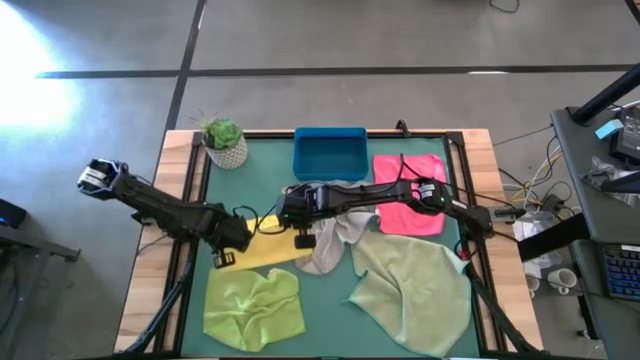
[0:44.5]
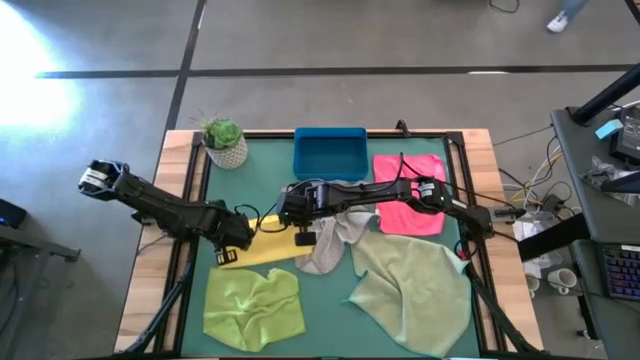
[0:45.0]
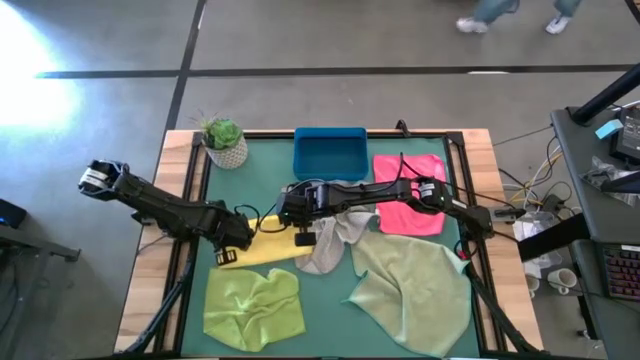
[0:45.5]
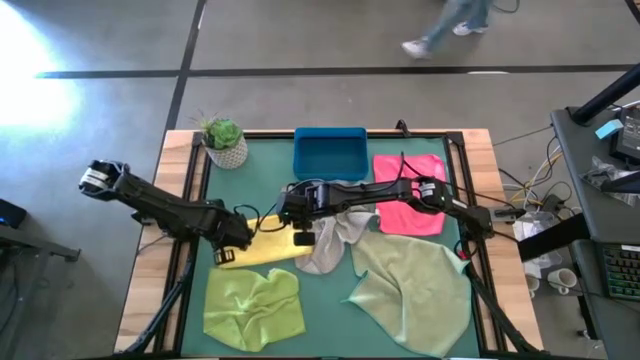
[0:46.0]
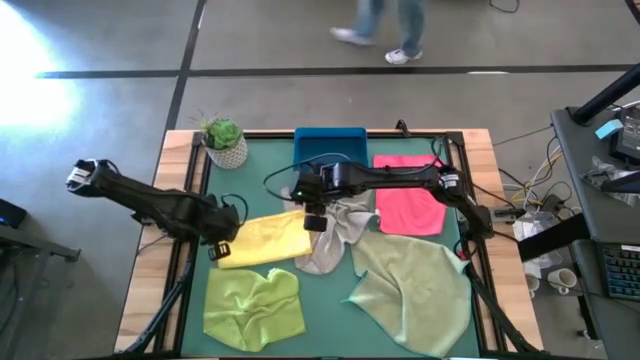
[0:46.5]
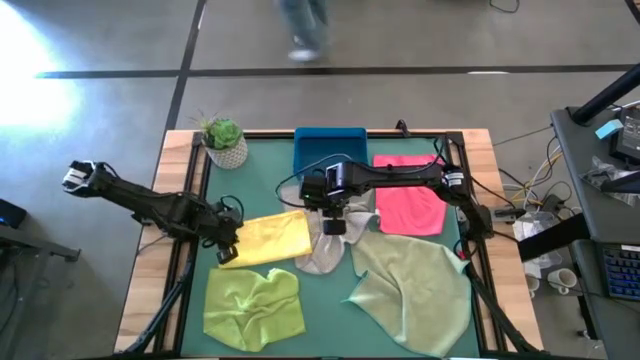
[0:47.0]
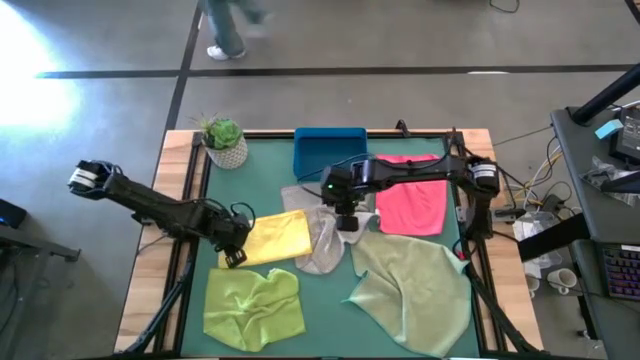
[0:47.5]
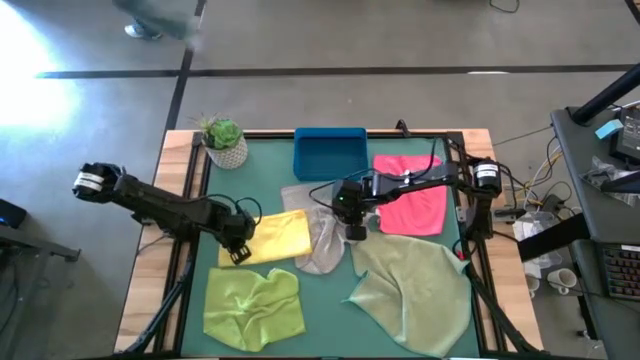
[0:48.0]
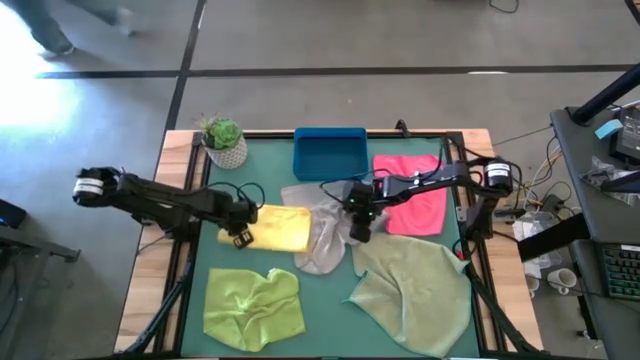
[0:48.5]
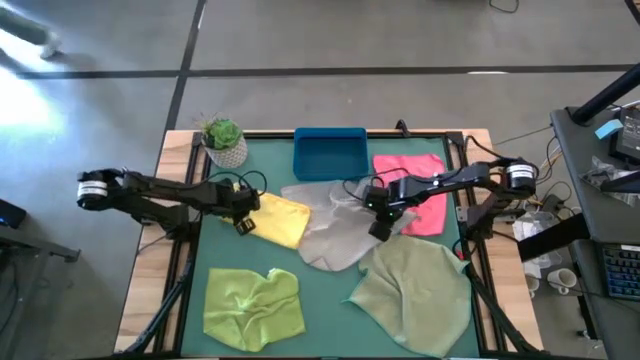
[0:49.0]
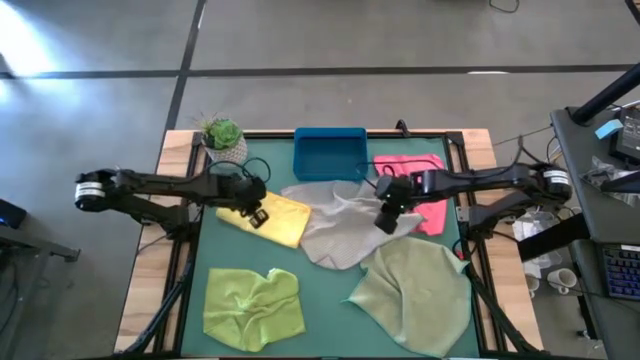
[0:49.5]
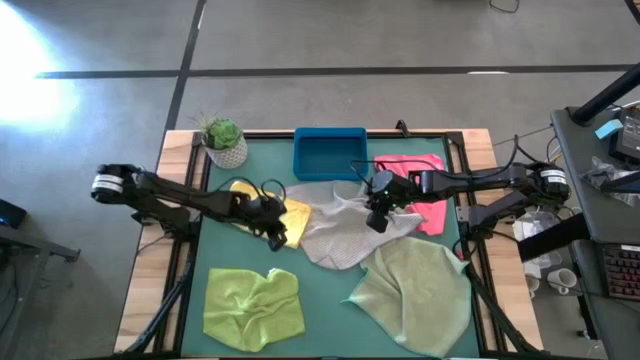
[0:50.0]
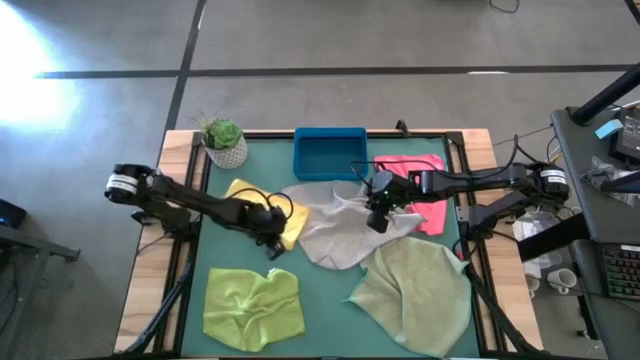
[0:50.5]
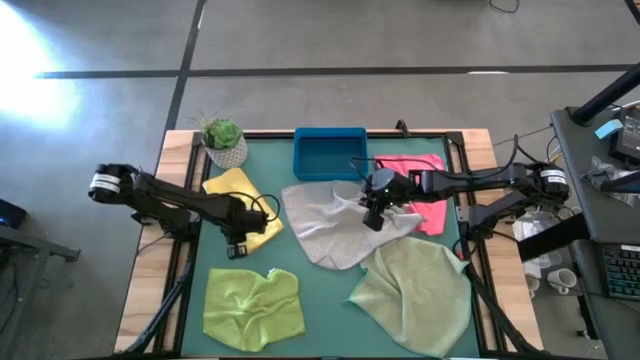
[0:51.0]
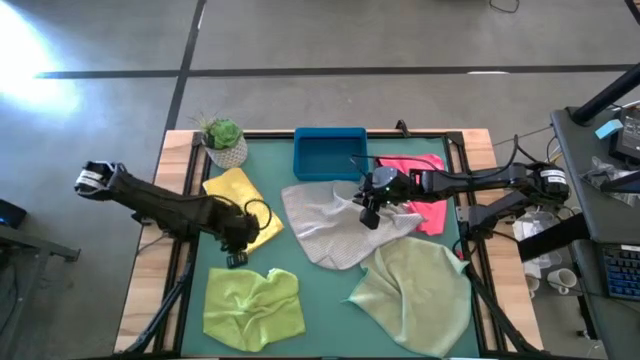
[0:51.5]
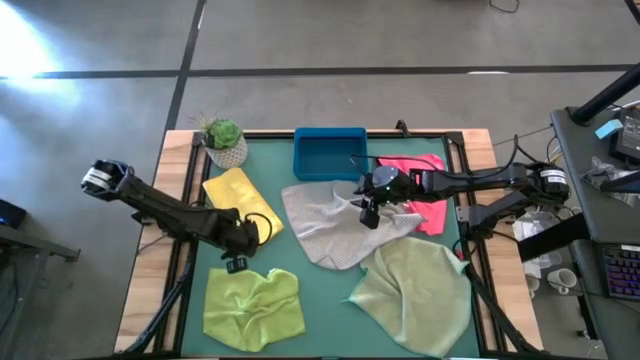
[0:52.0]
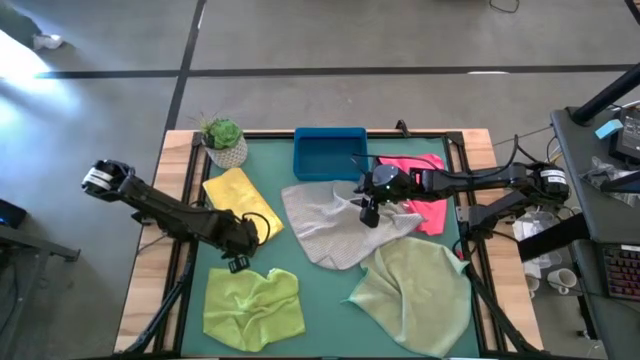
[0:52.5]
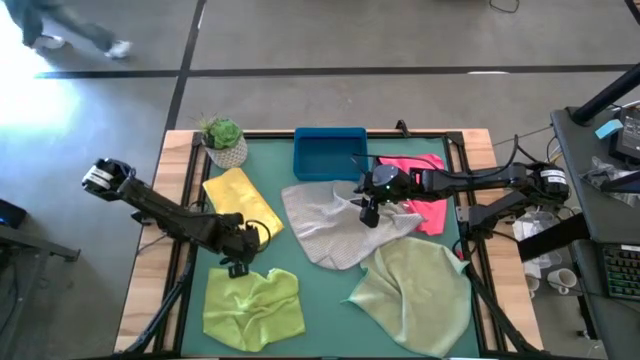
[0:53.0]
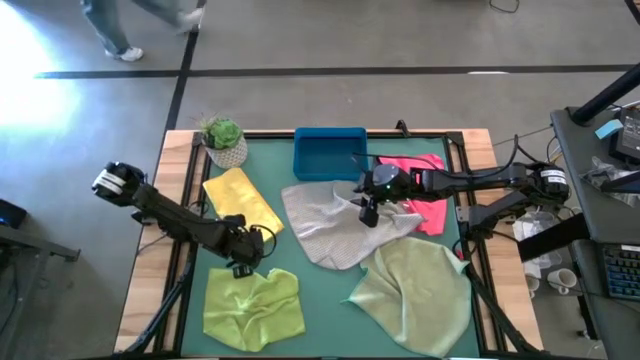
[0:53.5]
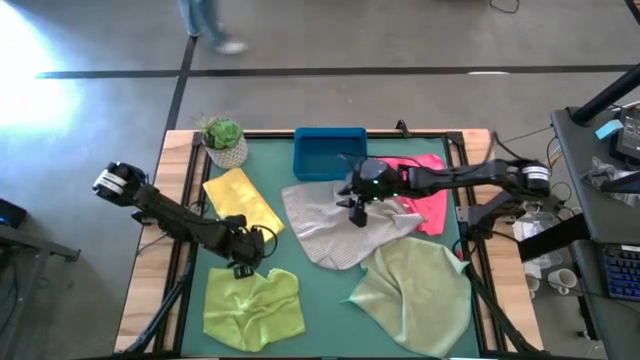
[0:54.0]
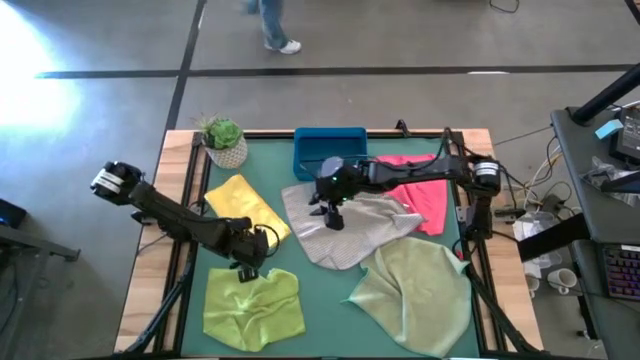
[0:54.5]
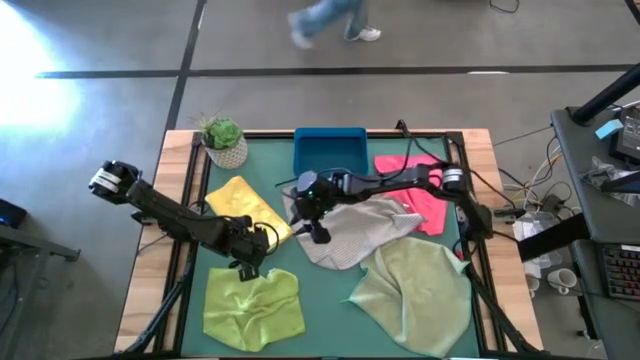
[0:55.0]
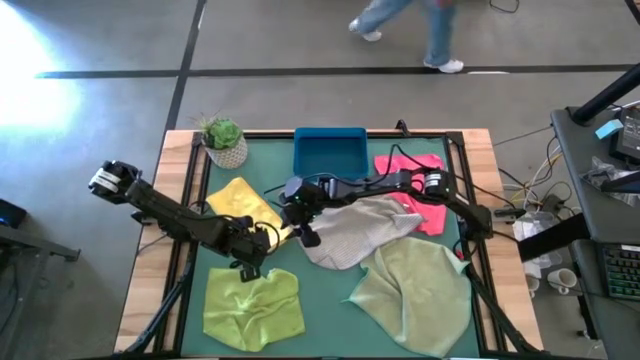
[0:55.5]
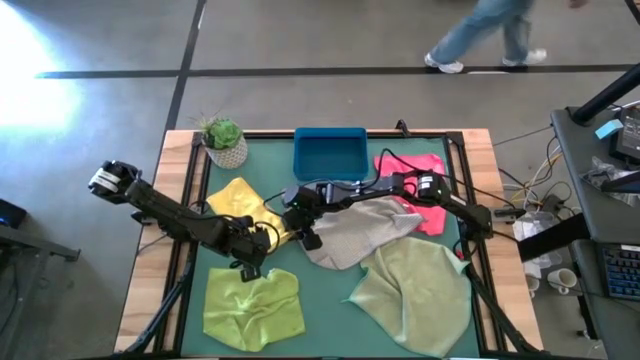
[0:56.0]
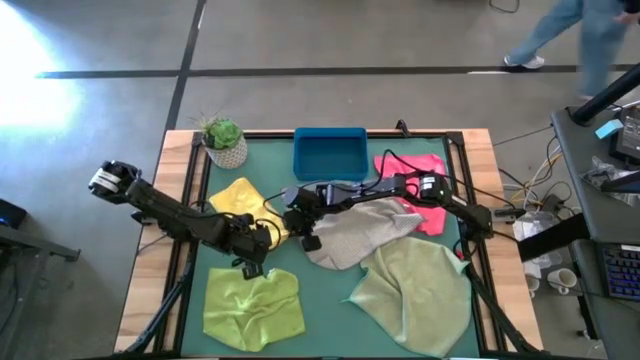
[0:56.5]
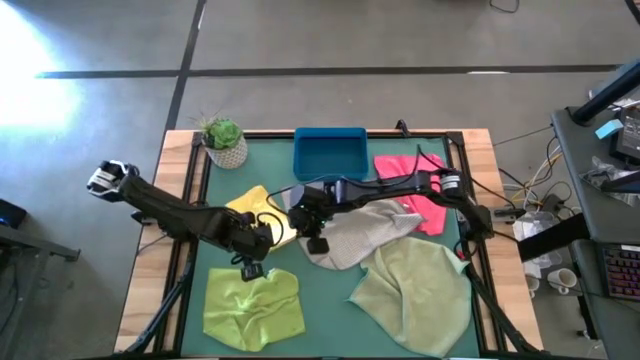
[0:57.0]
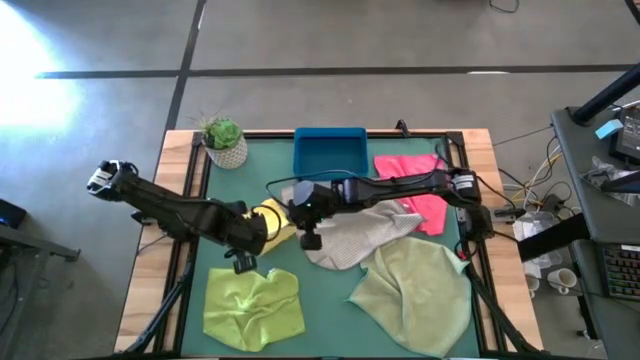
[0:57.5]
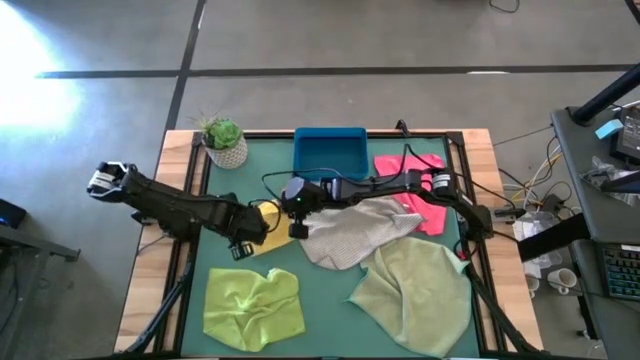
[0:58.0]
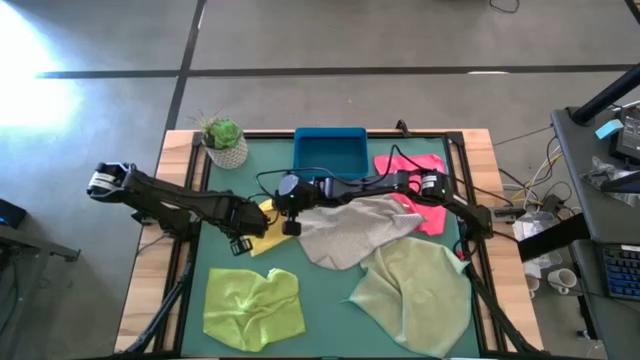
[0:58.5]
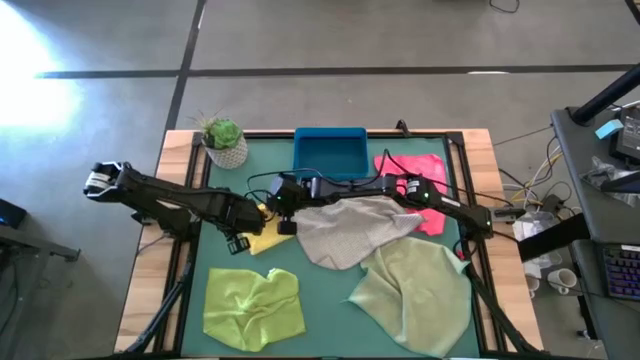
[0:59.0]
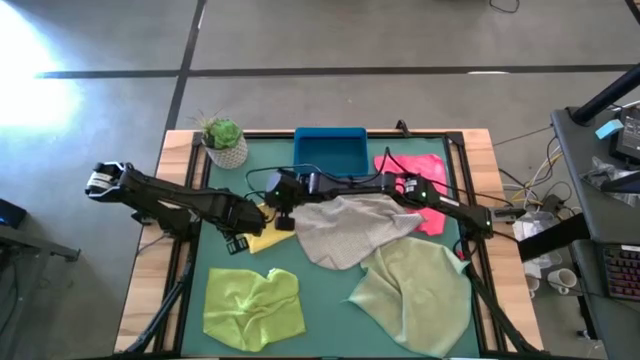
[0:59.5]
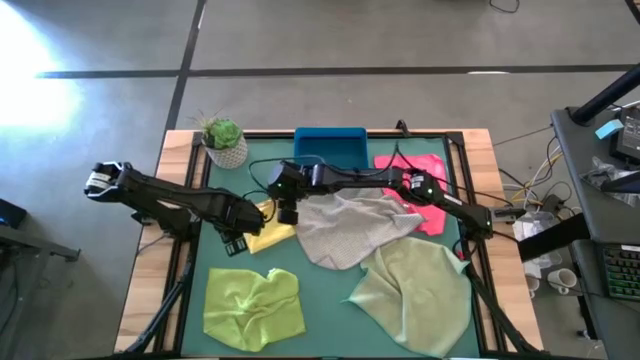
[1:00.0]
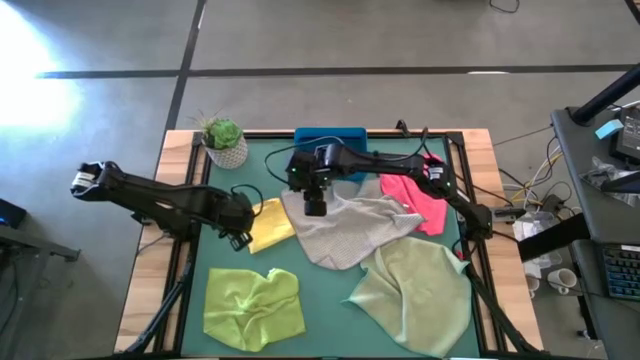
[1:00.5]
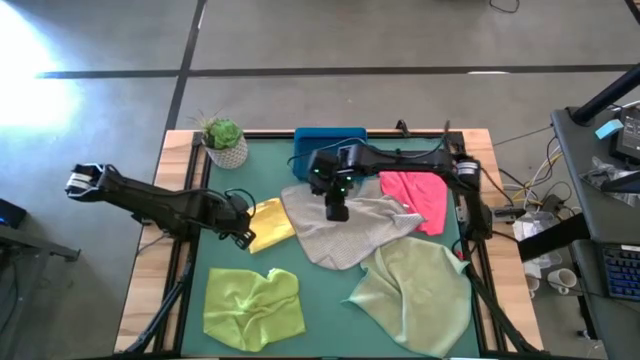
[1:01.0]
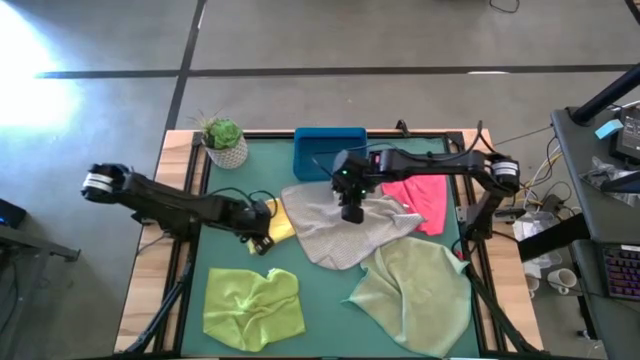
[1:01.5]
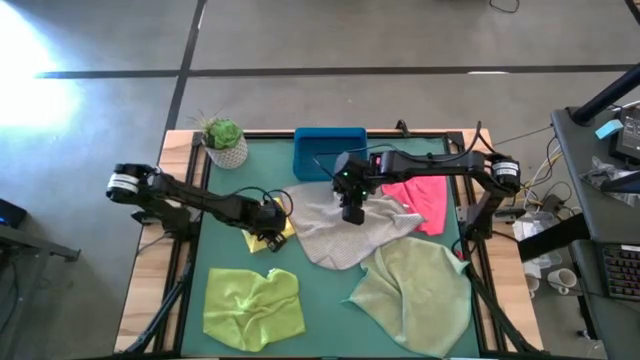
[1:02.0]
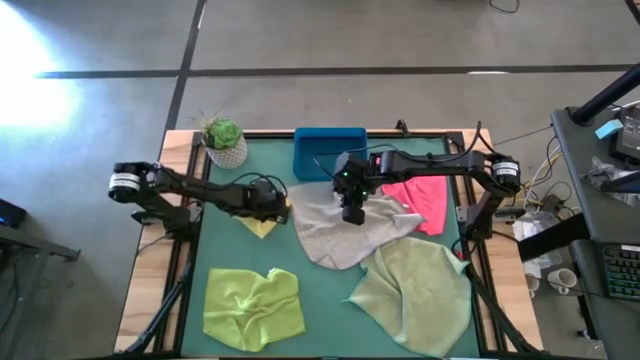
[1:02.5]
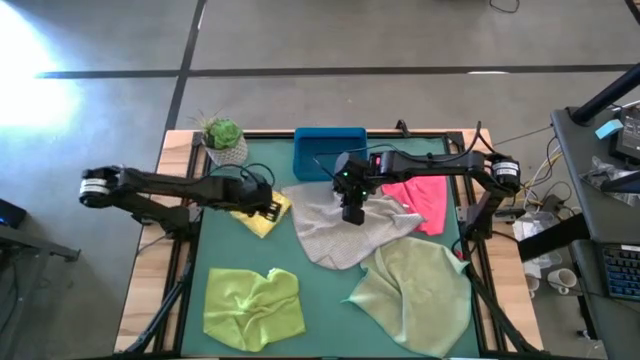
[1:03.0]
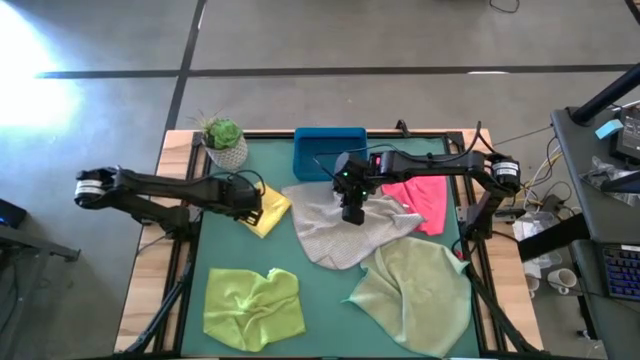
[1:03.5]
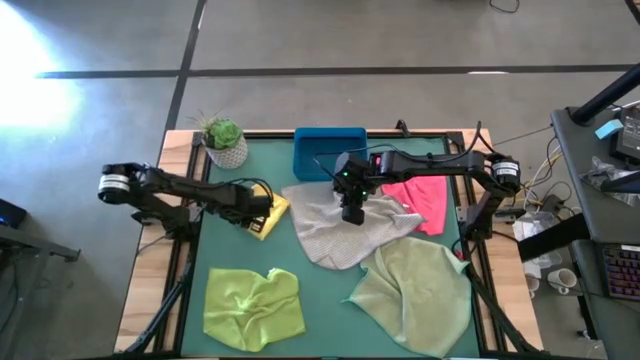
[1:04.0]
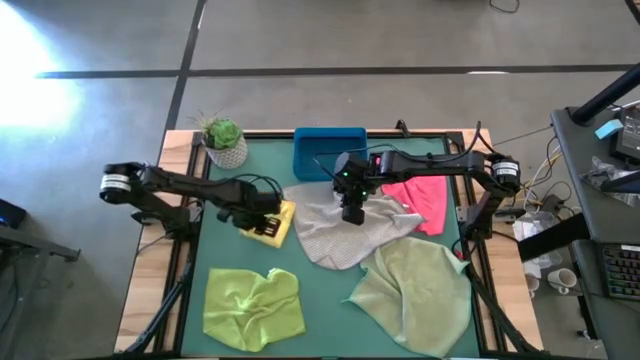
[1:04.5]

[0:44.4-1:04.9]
Task: Fold microfiber towels
Fold the yellow microfiber cloth
